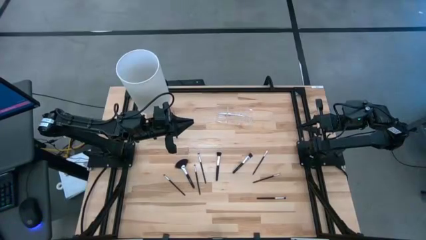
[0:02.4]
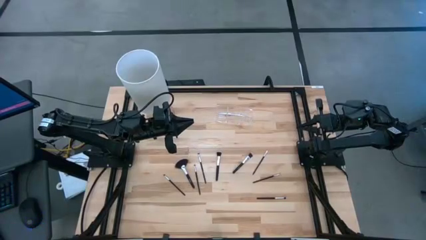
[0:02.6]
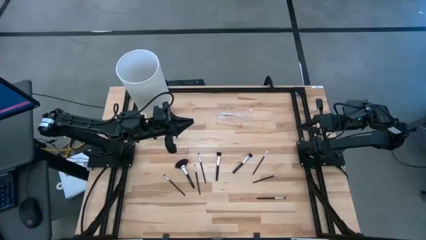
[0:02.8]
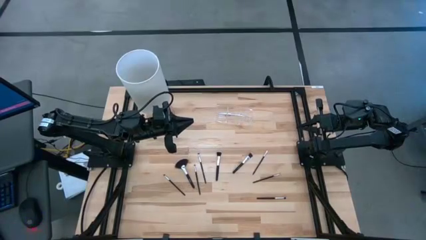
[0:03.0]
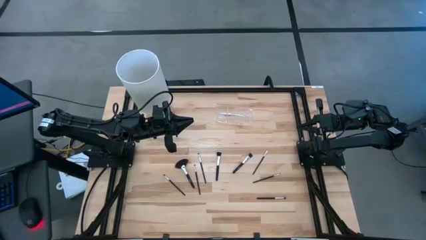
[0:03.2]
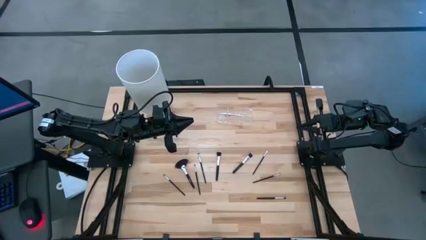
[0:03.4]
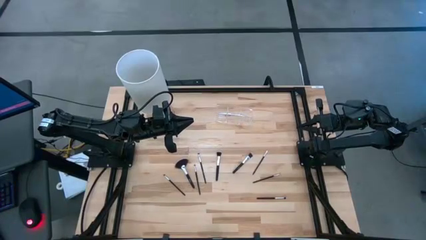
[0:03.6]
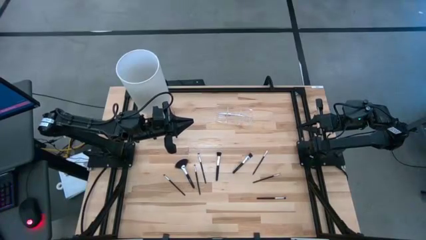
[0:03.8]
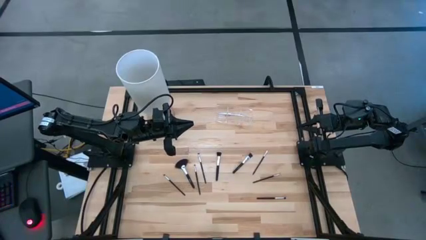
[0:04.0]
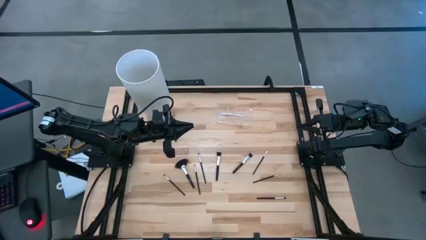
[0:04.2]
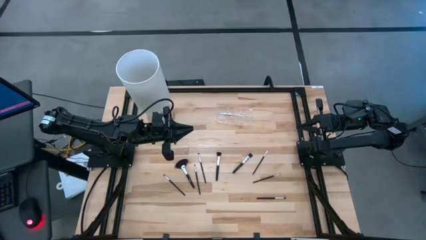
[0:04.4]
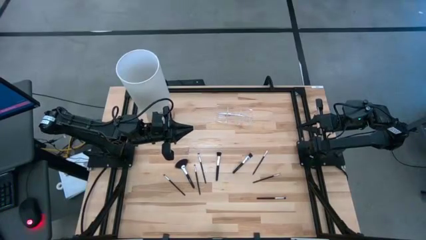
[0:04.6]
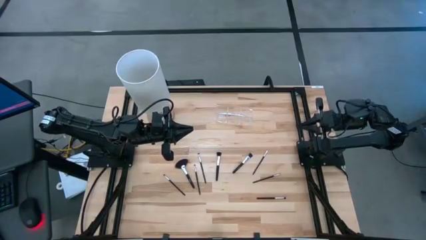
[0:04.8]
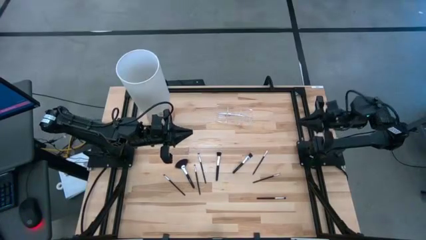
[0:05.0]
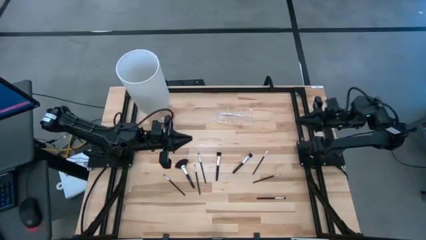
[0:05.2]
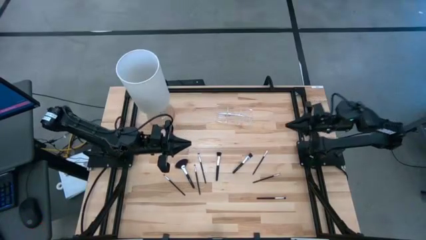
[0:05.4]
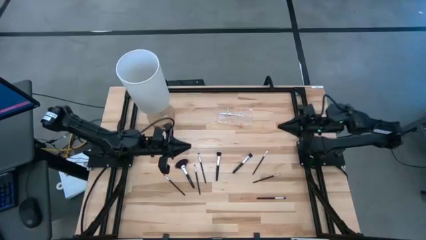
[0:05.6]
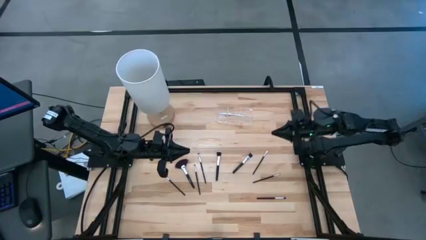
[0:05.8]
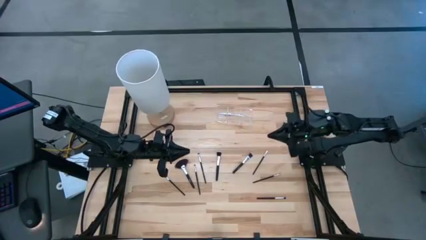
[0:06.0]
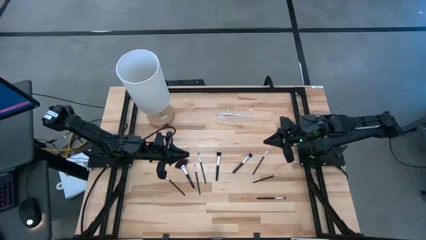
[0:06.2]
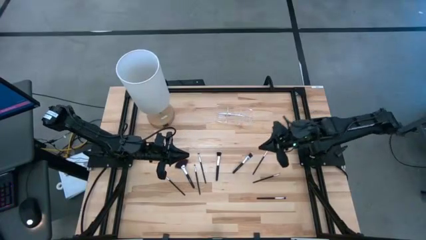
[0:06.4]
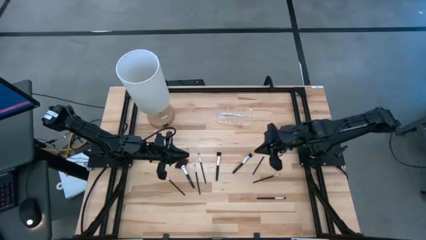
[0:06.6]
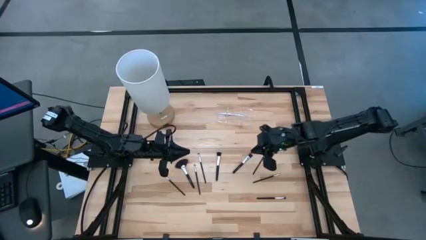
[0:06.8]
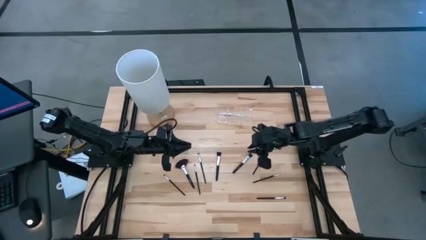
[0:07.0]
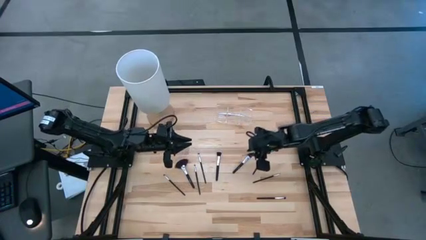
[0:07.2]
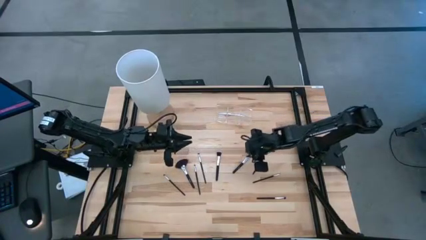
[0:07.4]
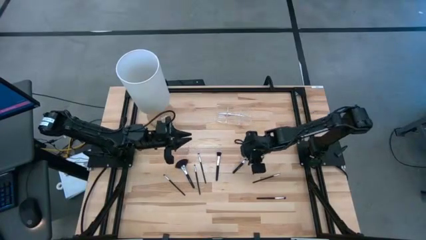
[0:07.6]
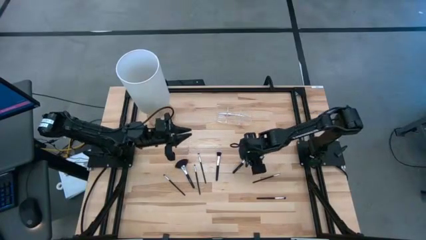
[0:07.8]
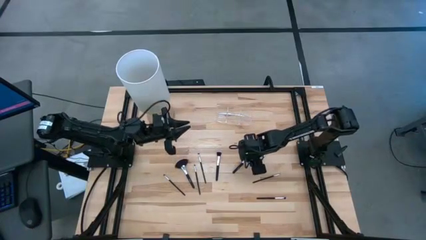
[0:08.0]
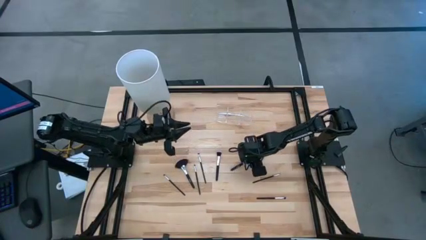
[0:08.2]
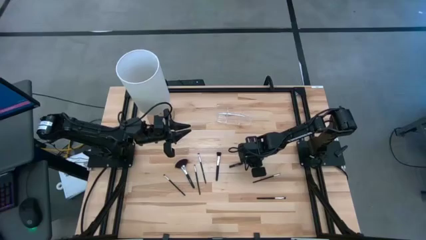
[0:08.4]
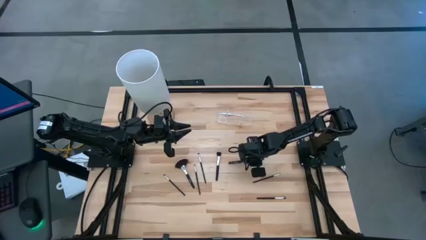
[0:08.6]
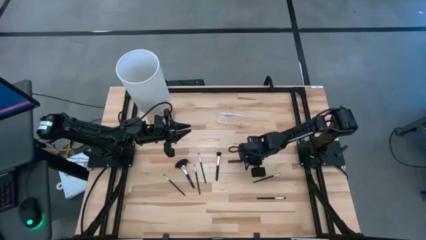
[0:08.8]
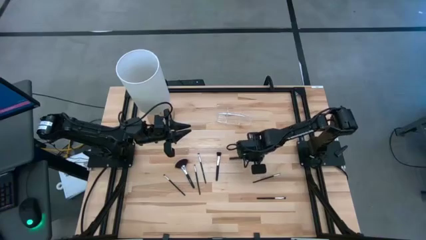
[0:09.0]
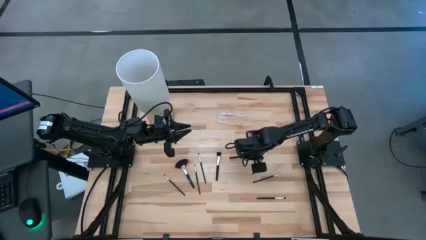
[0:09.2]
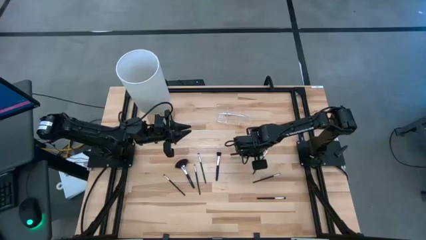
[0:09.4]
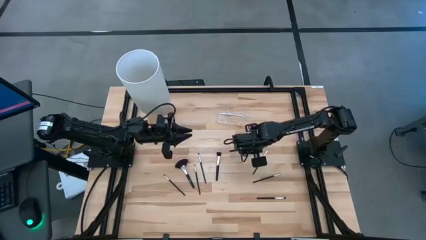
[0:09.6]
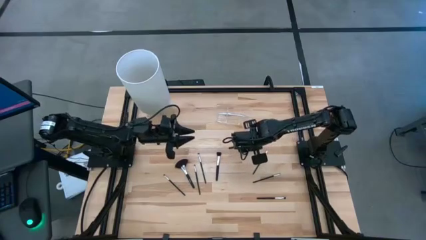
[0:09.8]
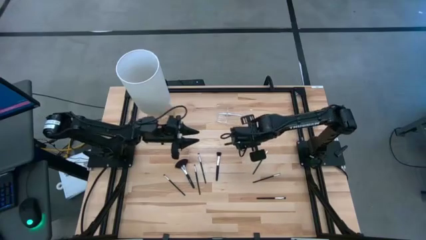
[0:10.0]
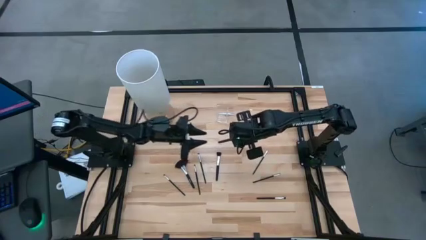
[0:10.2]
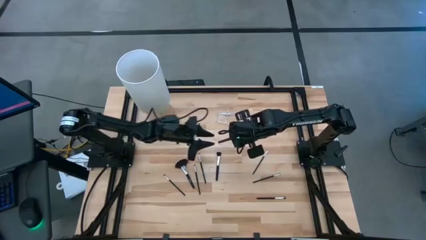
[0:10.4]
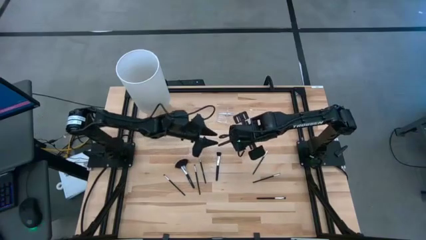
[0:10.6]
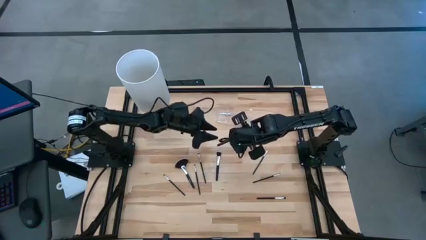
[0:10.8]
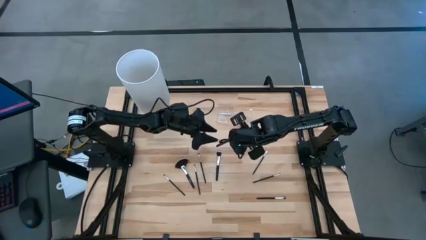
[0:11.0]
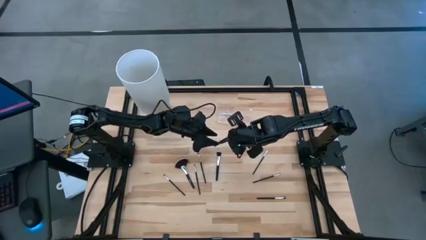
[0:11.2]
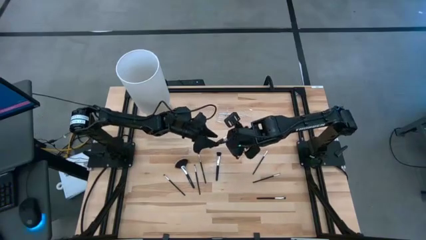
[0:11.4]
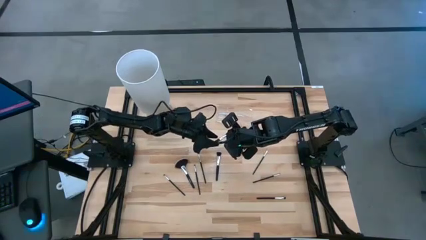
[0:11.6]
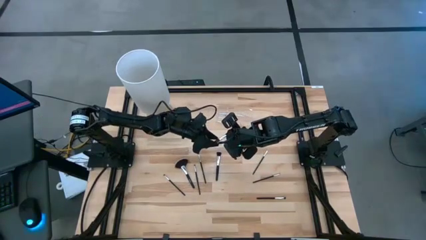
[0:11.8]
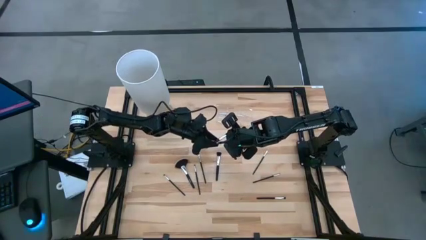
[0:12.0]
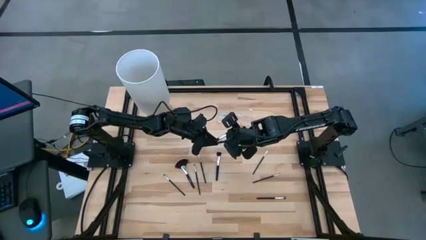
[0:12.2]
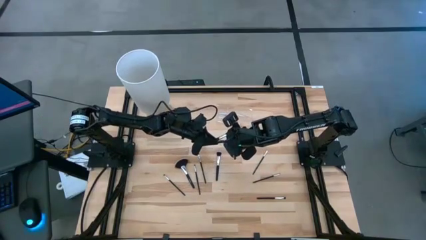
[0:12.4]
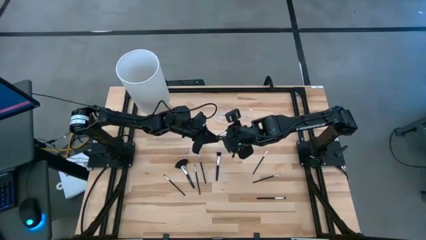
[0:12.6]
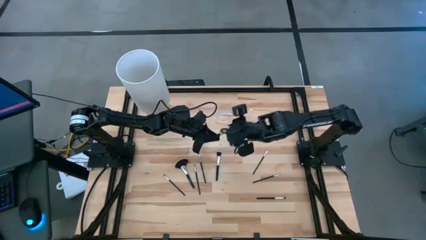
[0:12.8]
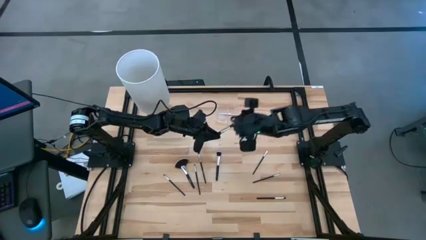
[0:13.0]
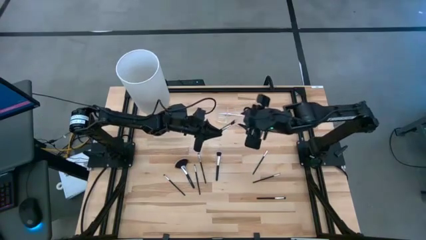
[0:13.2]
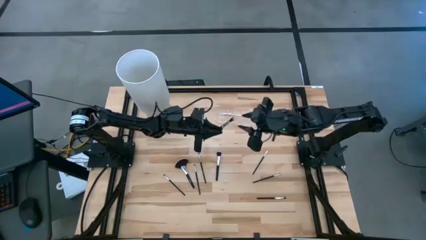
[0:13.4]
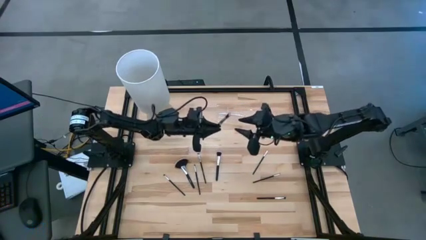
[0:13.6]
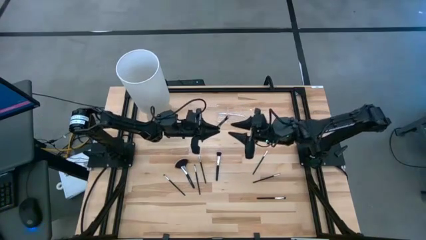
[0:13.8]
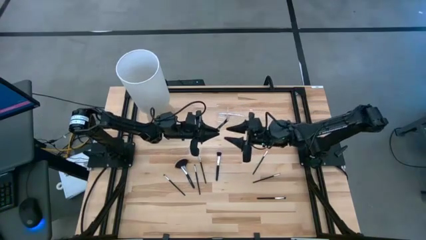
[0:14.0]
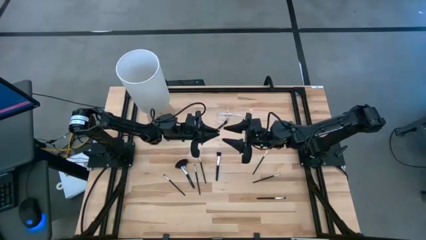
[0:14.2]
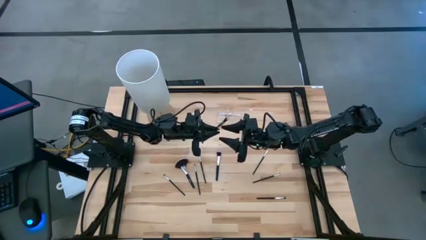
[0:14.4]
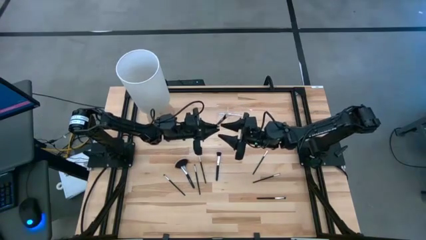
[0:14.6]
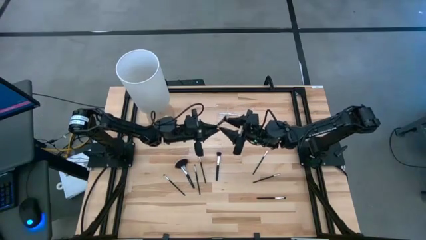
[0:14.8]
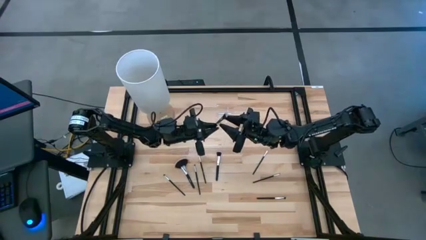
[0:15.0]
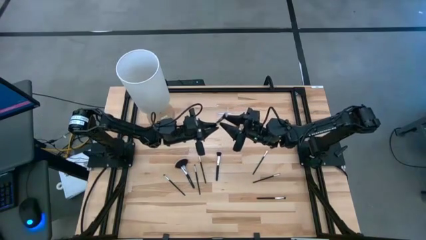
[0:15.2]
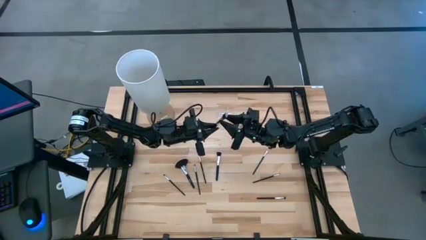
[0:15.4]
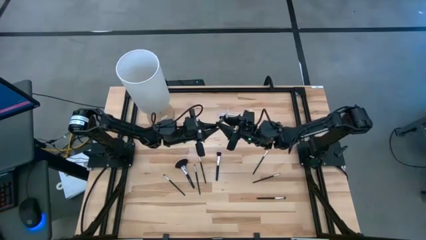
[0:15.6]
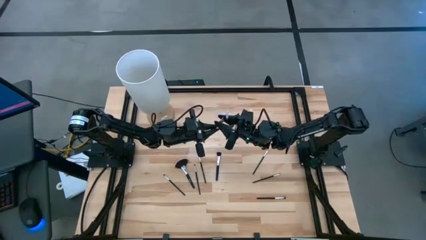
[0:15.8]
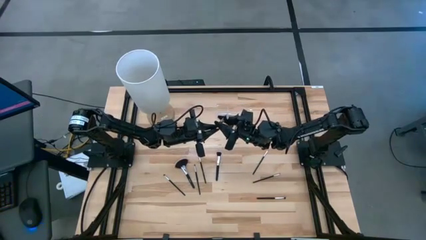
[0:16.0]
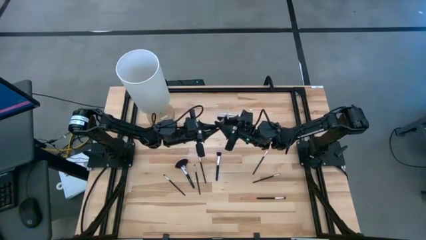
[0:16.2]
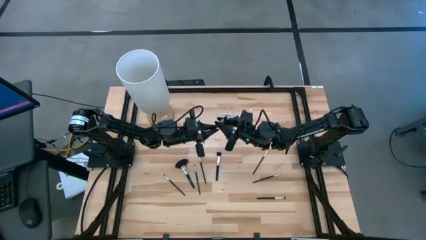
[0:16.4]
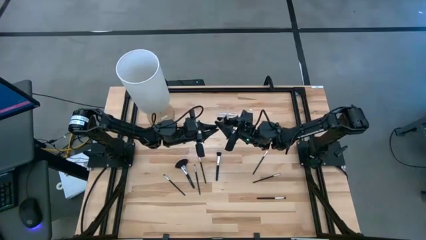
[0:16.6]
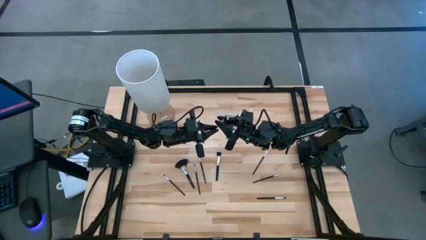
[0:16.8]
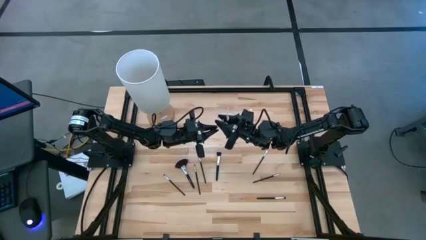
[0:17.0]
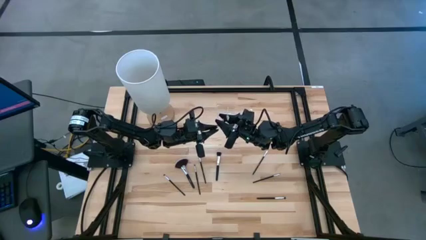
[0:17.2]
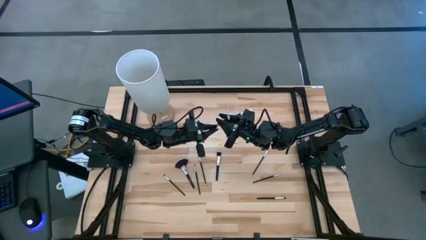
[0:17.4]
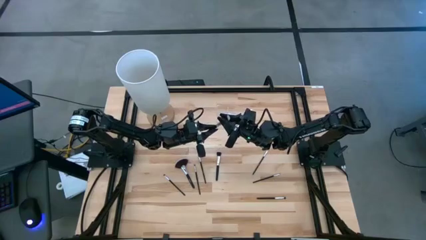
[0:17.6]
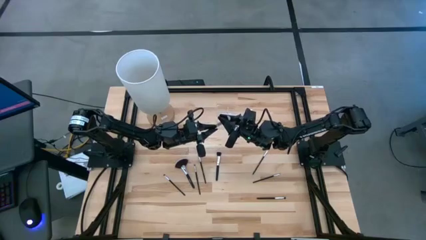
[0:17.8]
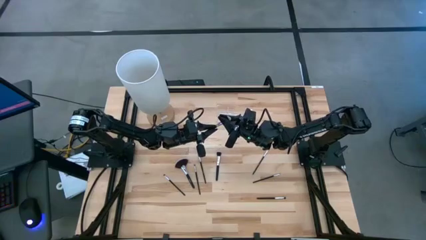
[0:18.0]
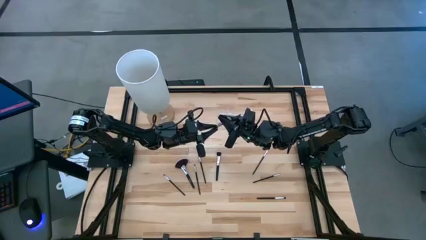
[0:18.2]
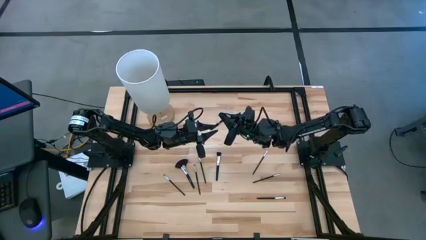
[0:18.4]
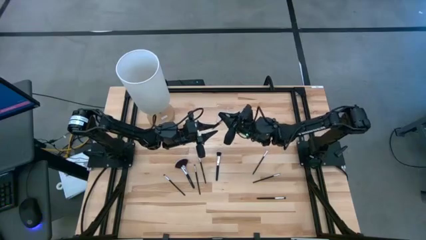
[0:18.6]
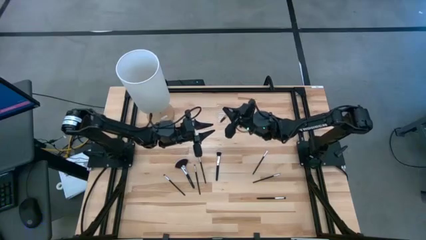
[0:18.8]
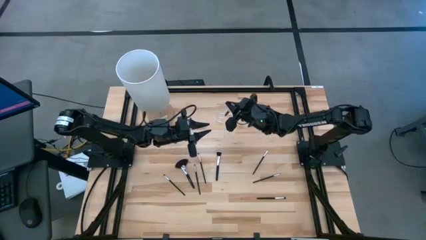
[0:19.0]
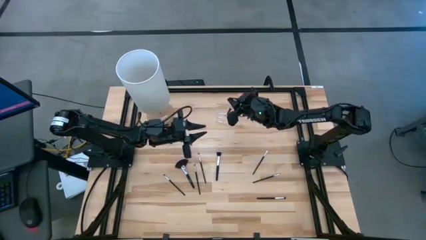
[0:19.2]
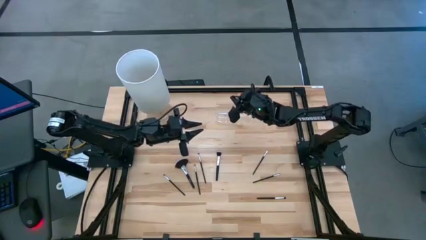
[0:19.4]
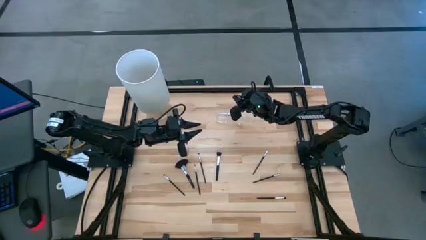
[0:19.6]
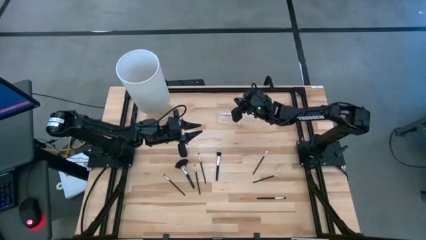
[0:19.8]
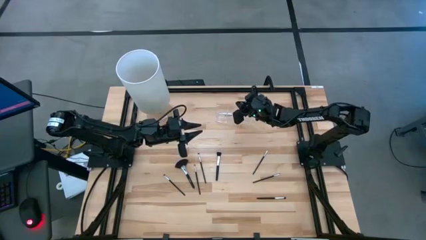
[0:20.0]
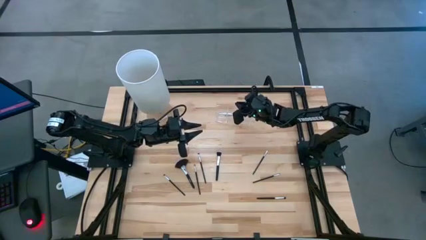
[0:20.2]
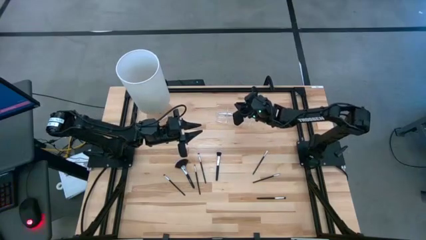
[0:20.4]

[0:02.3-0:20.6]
Task: Put items in baskets/containers
Put the black foundation brush into the transparent organizer
